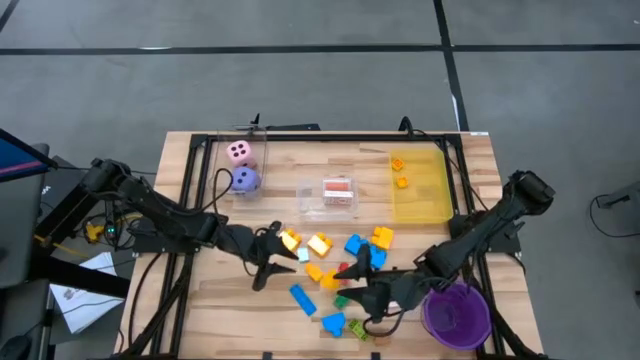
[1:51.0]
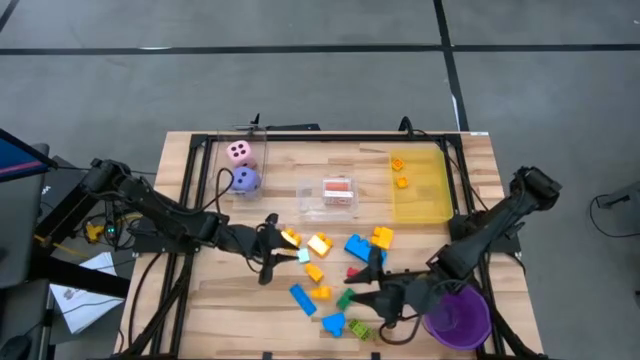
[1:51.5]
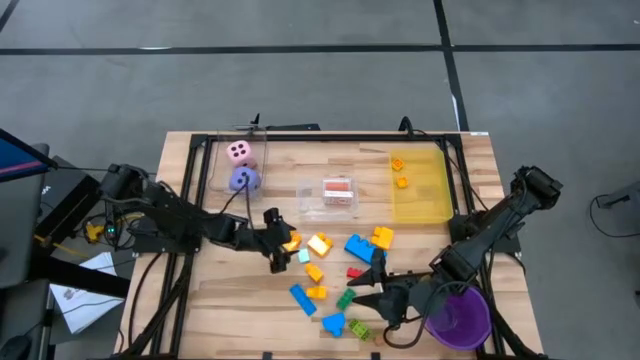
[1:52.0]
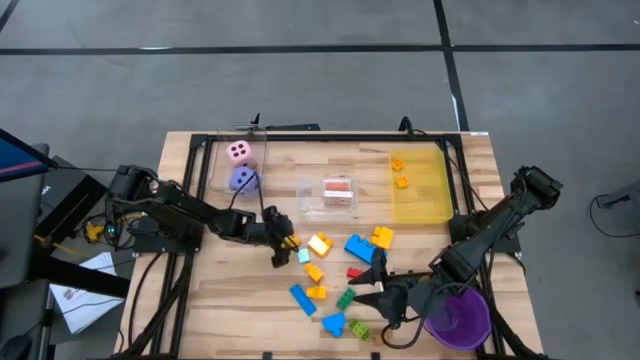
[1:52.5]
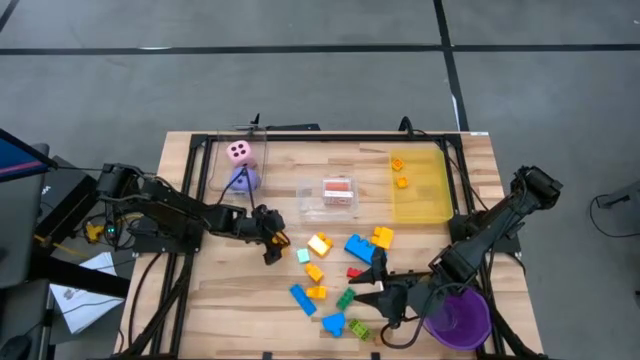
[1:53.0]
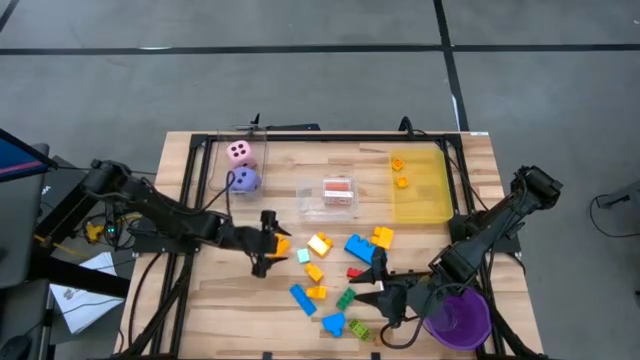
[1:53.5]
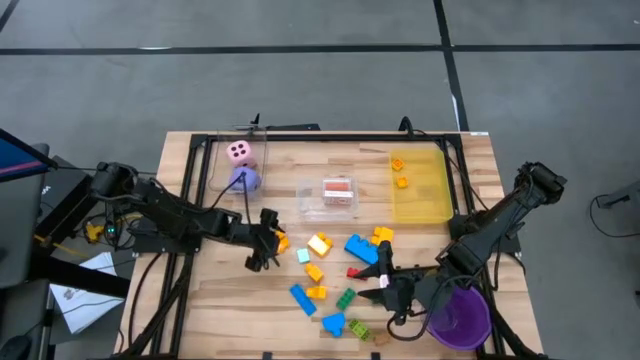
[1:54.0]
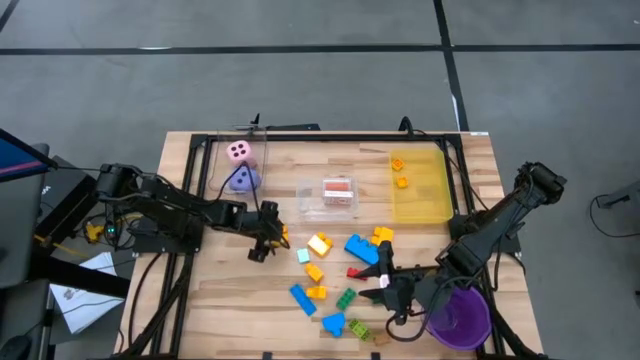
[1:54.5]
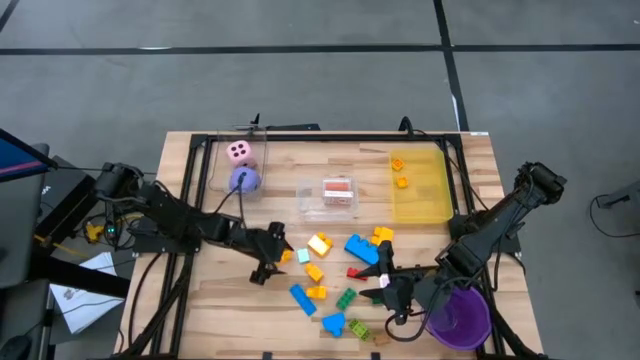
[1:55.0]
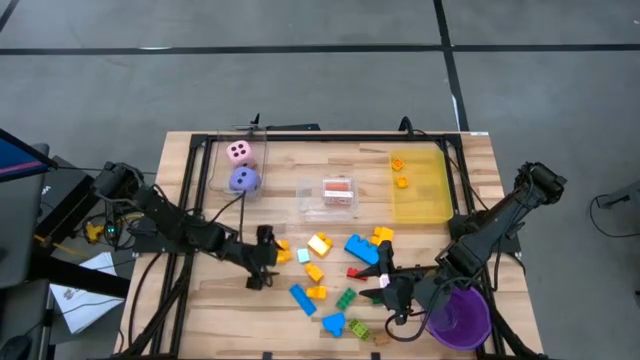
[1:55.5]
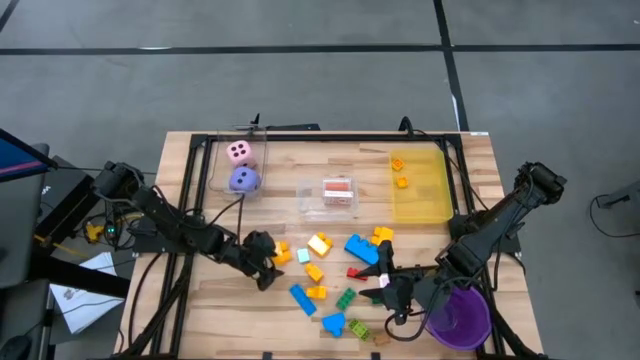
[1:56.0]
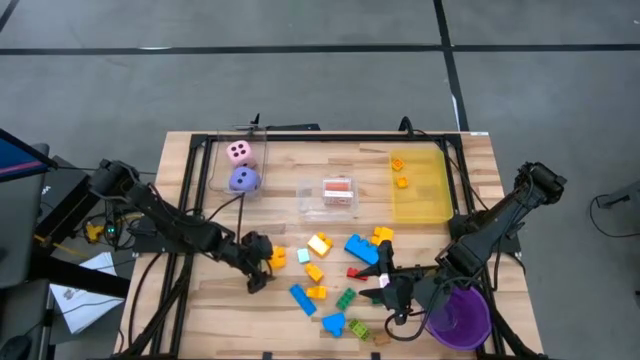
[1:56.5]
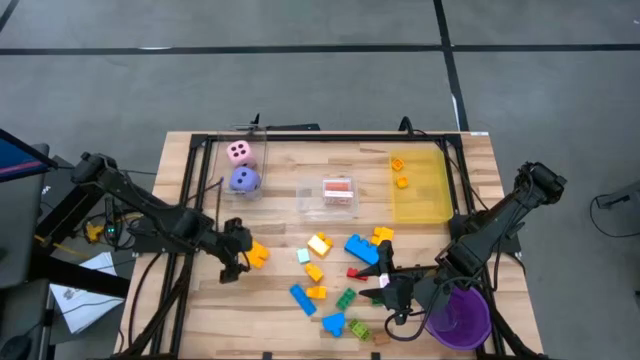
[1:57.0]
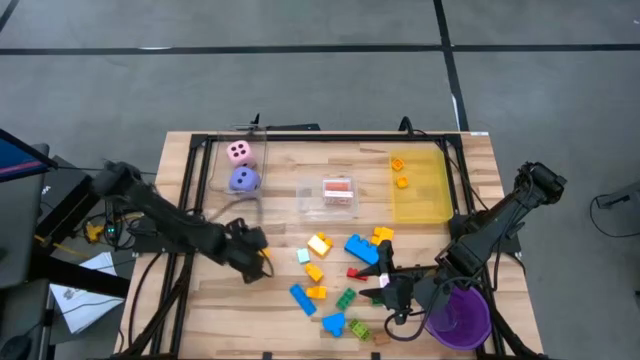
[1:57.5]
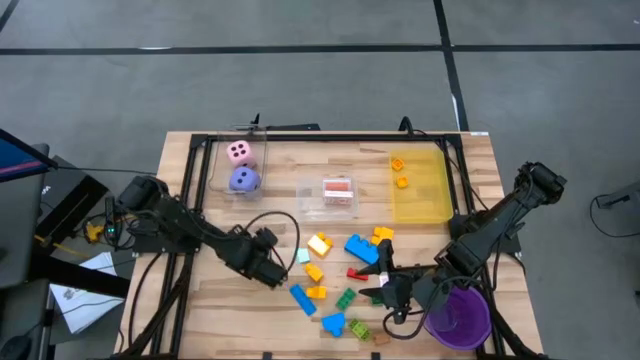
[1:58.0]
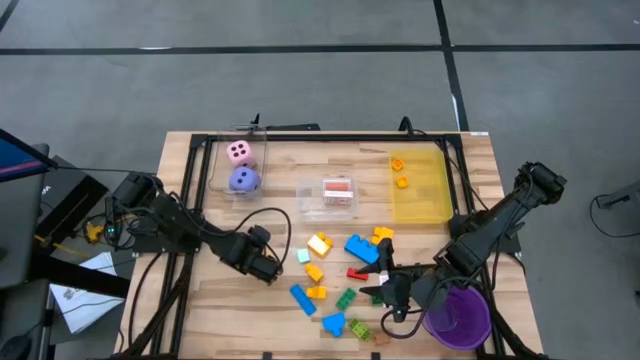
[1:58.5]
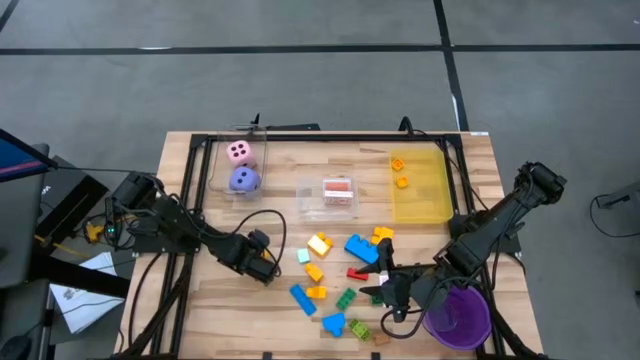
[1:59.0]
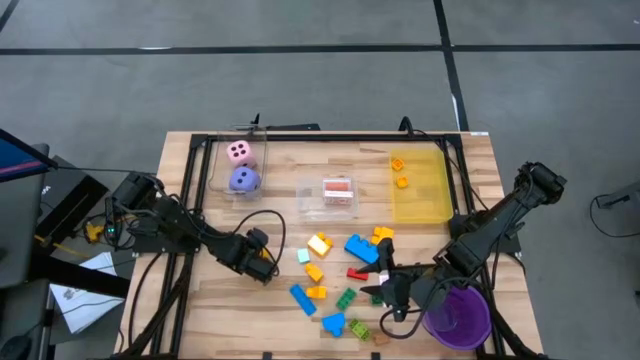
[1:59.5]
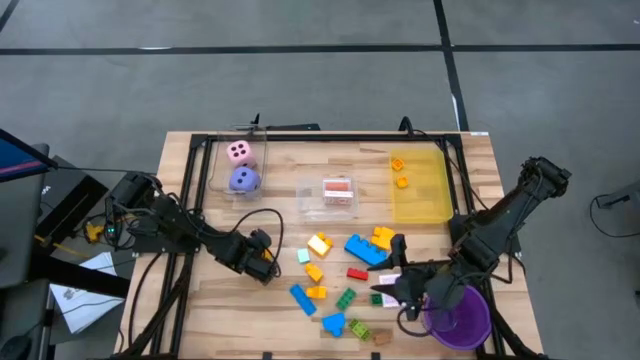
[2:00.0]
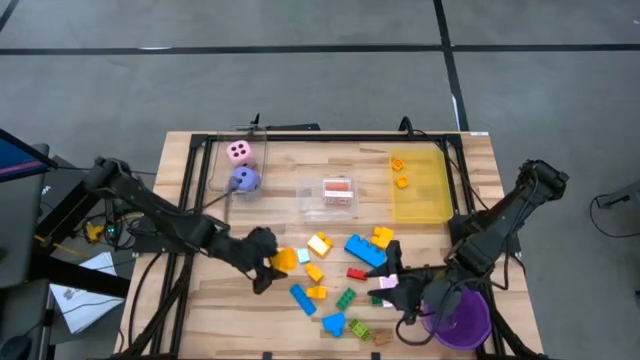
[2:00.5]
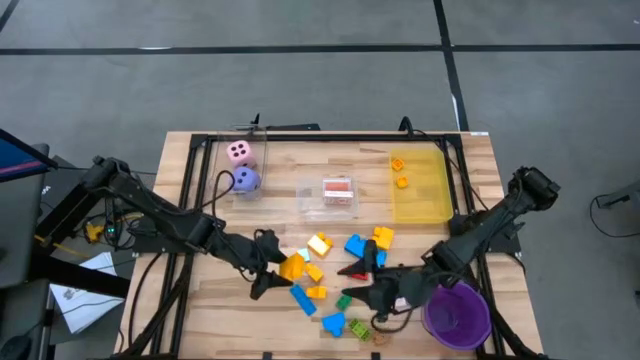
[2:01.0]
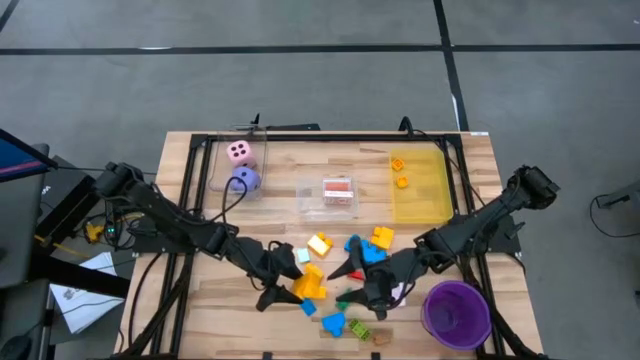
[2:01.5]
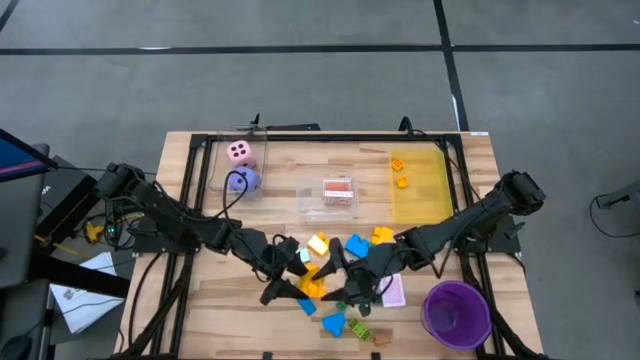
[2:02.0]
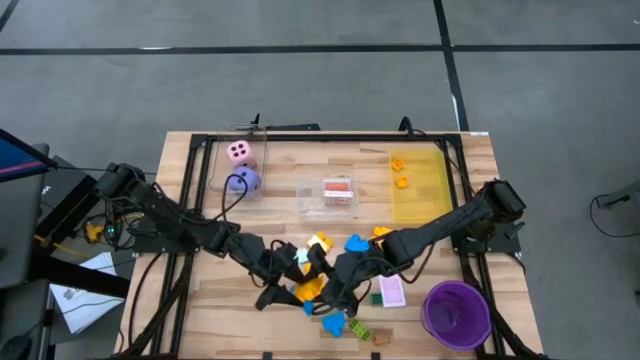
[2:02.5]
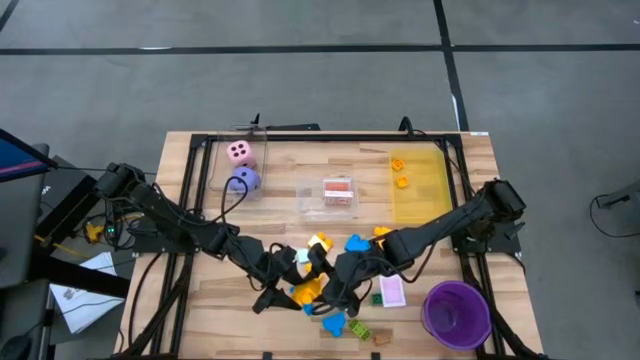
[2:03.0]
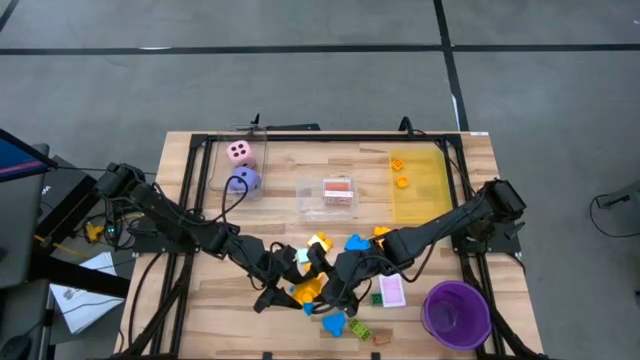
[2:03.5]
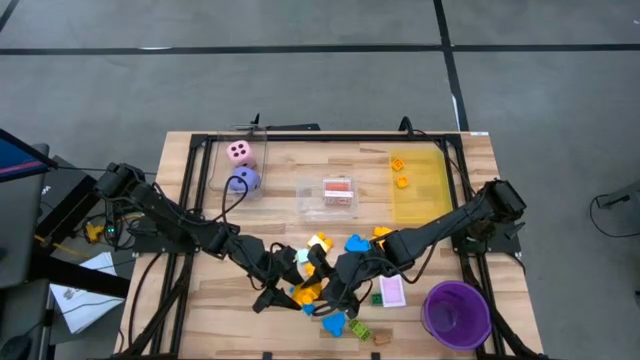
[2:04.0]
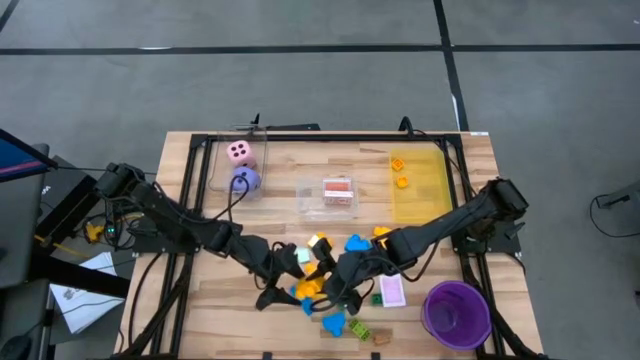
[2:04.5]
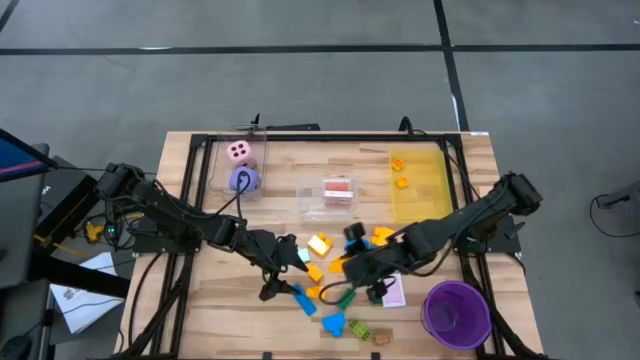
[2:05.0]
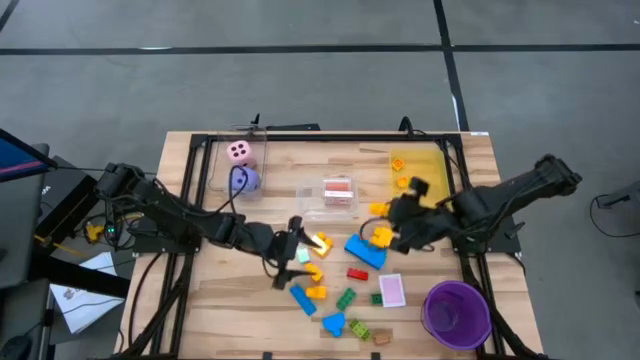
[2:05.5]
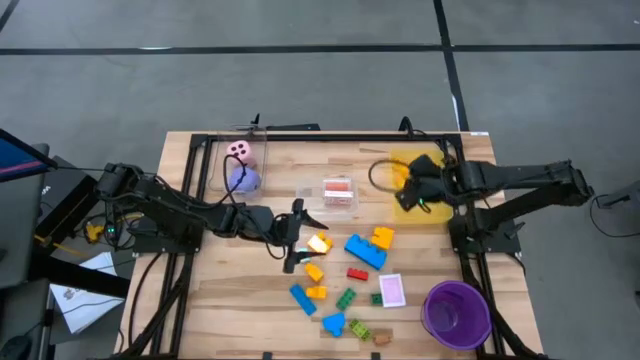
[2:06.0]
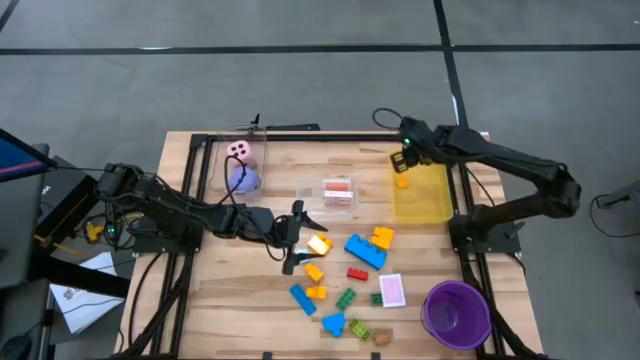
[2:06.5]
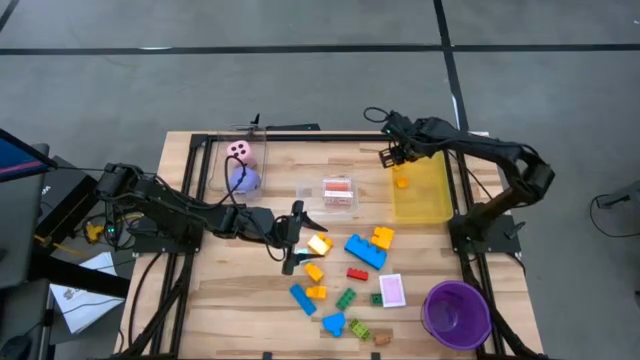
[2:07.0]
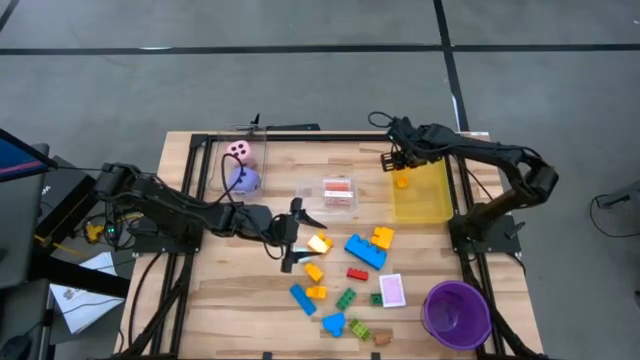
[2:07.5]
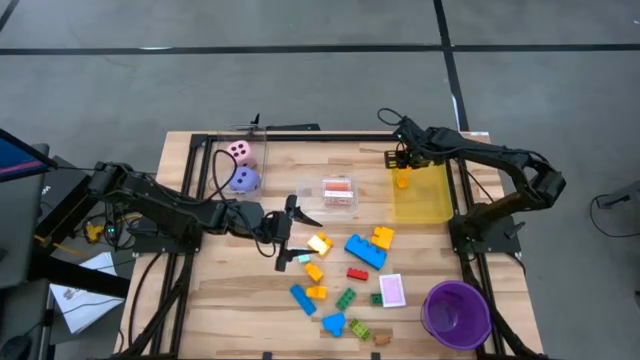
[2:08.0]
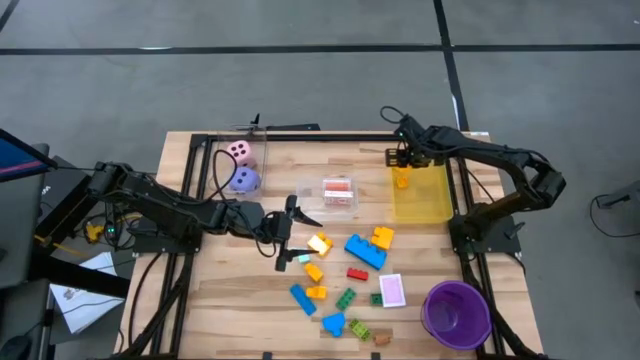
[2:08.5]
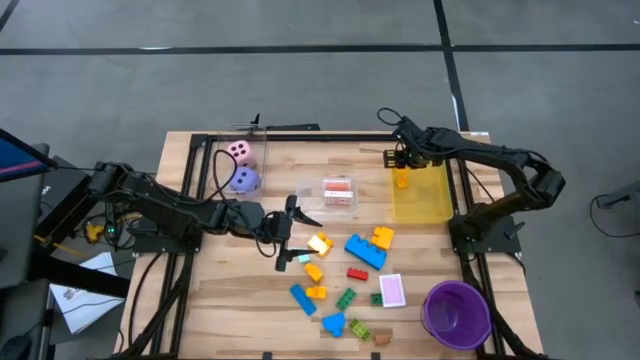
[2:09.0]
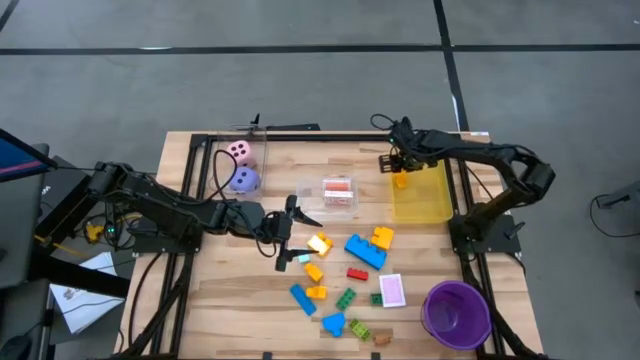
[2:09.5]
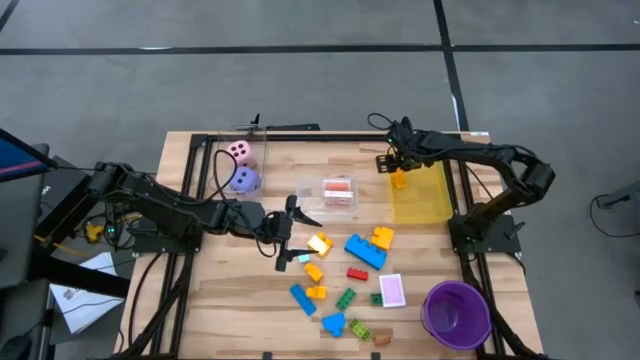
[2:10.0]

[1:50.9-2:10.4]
Task: Pick & Place Toys
Put the yellow game piece into the yellow bin
